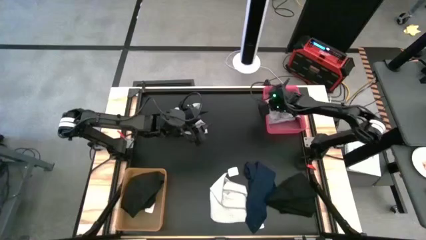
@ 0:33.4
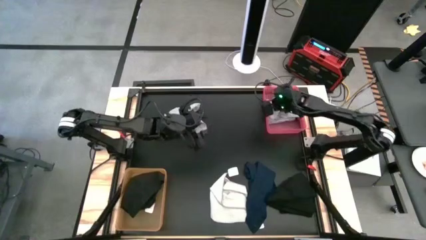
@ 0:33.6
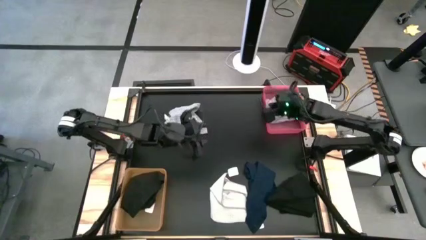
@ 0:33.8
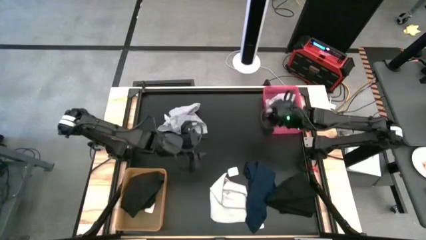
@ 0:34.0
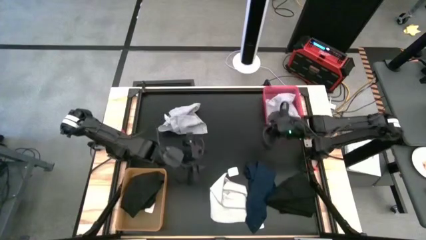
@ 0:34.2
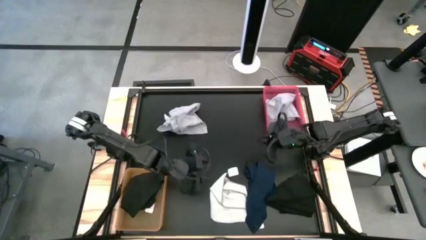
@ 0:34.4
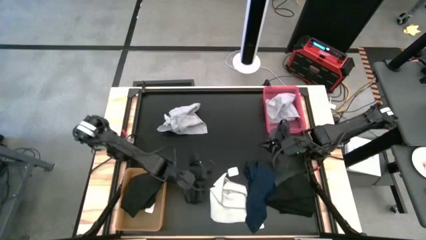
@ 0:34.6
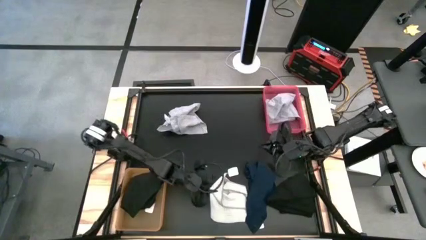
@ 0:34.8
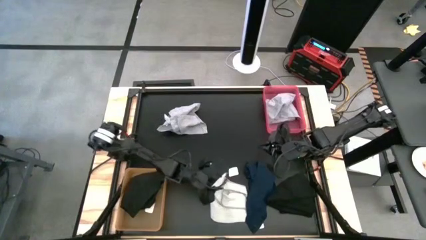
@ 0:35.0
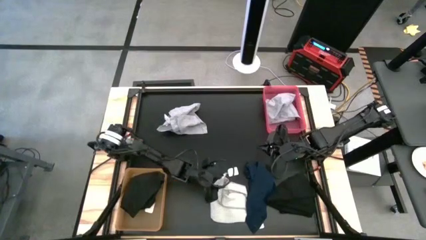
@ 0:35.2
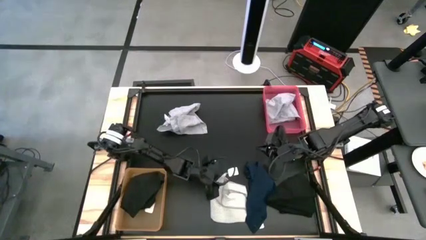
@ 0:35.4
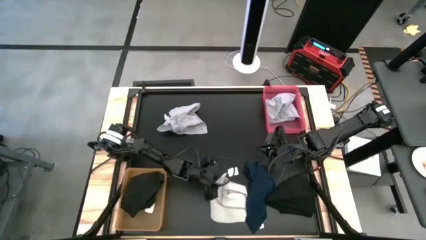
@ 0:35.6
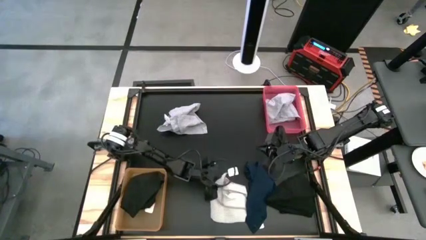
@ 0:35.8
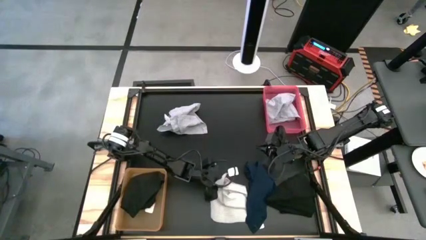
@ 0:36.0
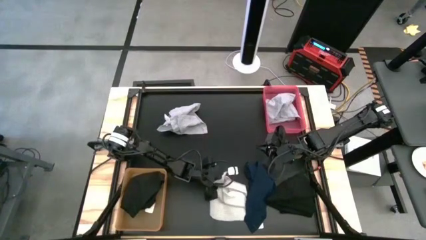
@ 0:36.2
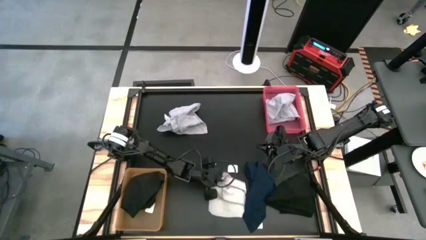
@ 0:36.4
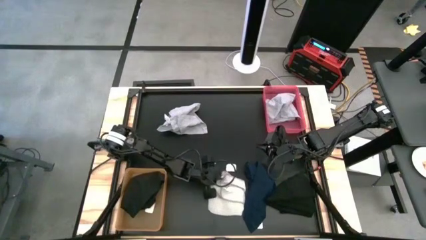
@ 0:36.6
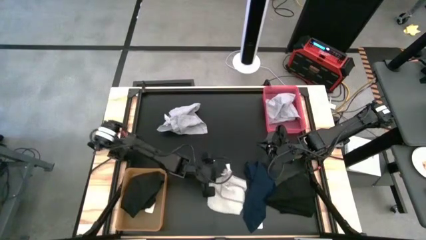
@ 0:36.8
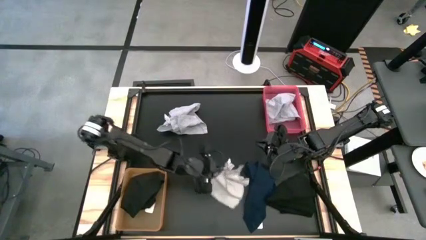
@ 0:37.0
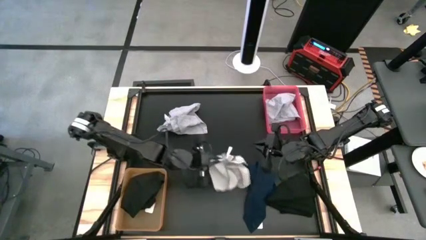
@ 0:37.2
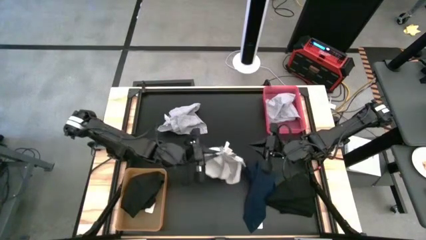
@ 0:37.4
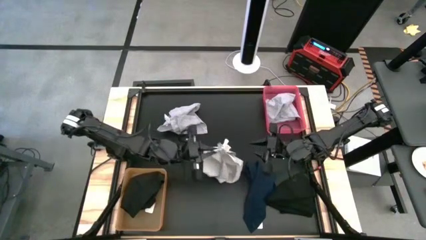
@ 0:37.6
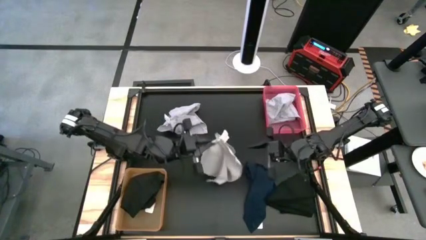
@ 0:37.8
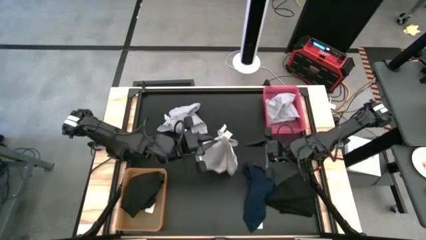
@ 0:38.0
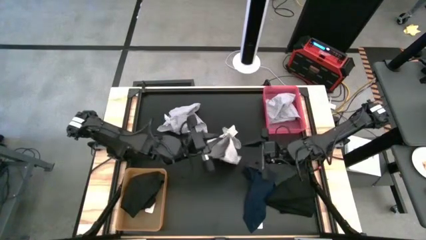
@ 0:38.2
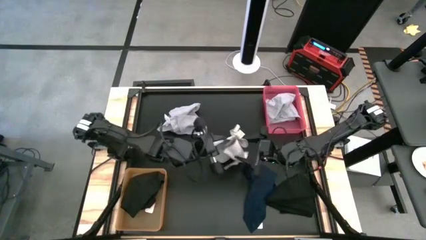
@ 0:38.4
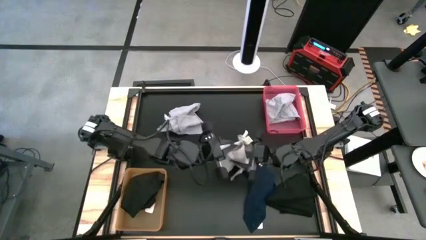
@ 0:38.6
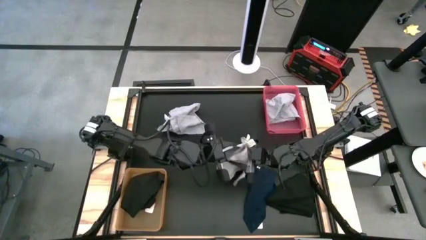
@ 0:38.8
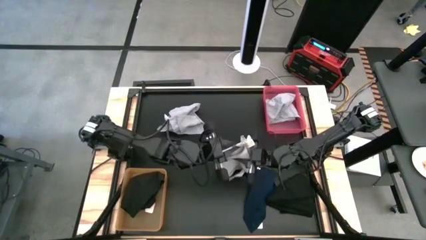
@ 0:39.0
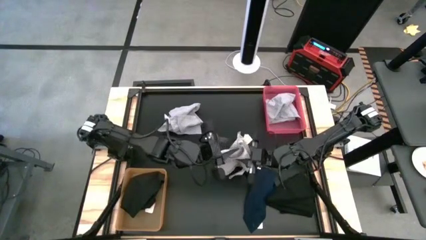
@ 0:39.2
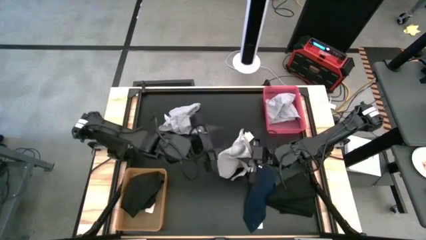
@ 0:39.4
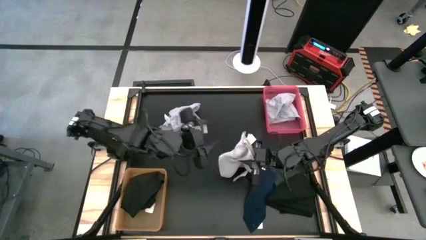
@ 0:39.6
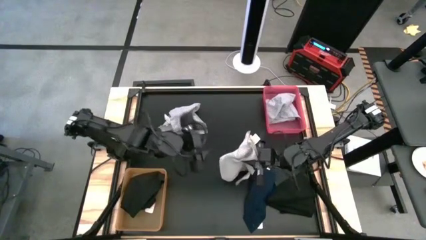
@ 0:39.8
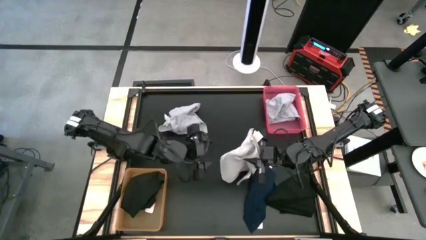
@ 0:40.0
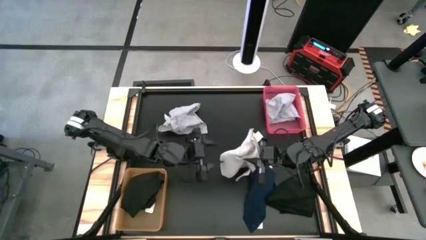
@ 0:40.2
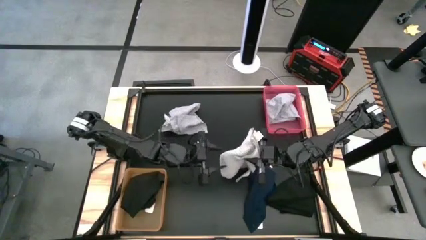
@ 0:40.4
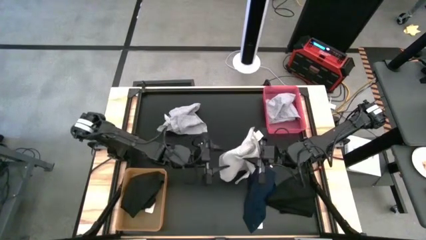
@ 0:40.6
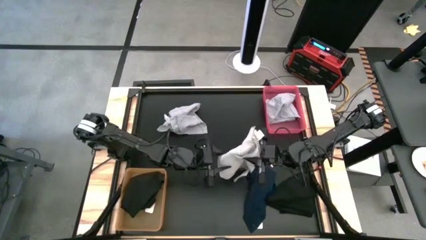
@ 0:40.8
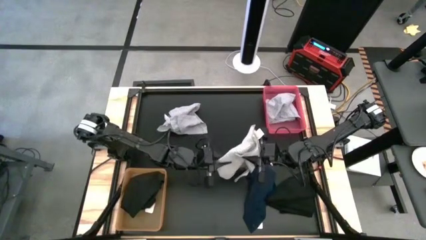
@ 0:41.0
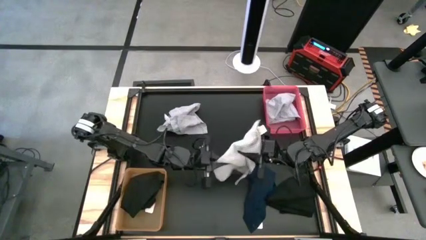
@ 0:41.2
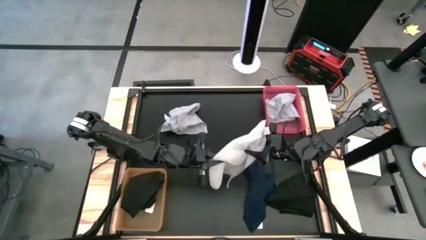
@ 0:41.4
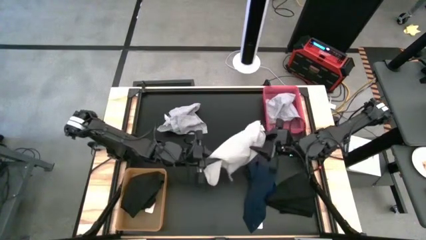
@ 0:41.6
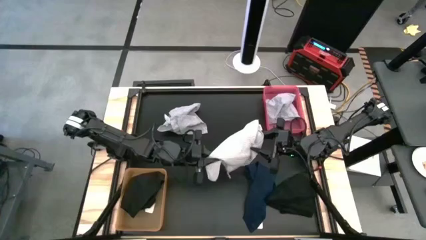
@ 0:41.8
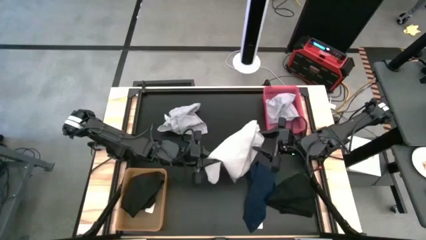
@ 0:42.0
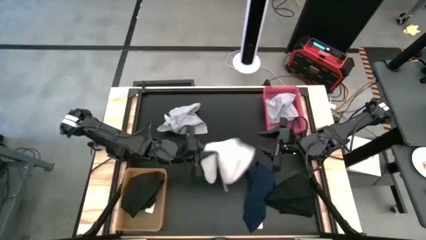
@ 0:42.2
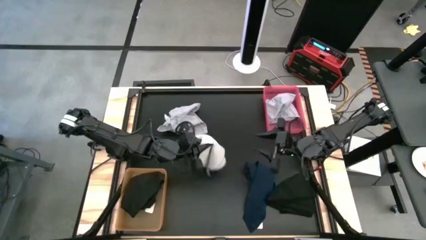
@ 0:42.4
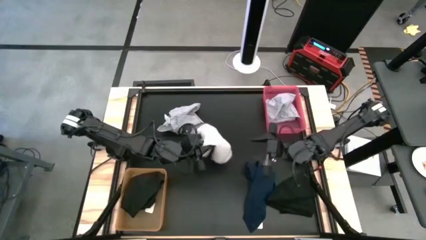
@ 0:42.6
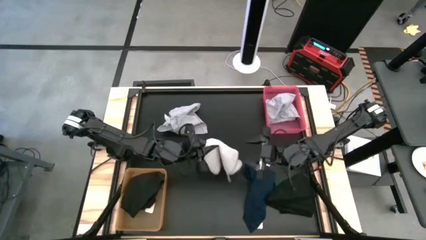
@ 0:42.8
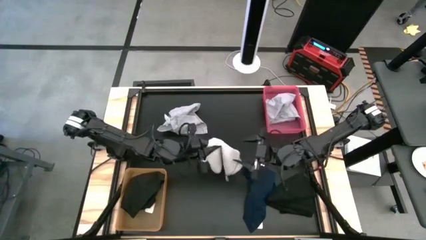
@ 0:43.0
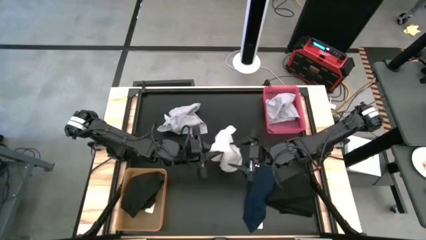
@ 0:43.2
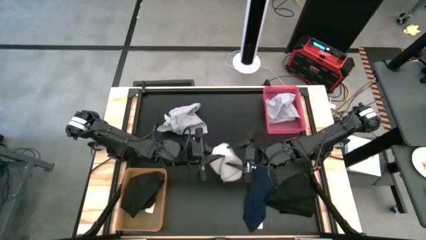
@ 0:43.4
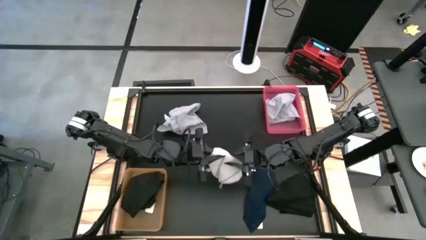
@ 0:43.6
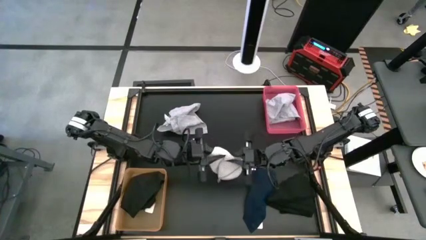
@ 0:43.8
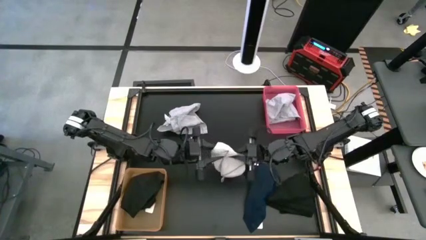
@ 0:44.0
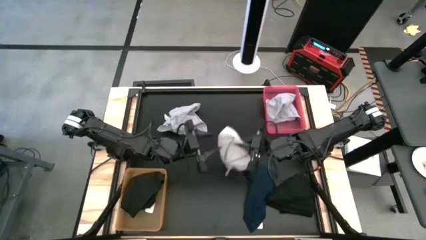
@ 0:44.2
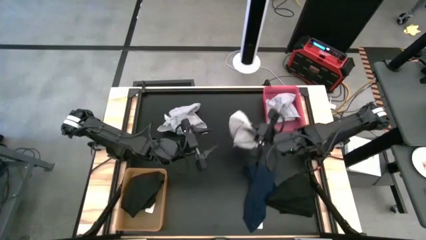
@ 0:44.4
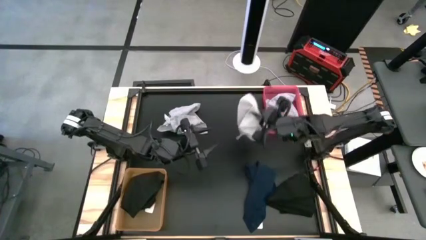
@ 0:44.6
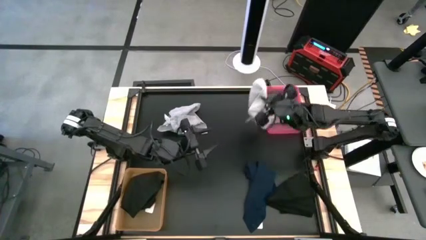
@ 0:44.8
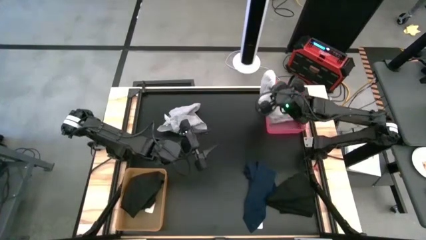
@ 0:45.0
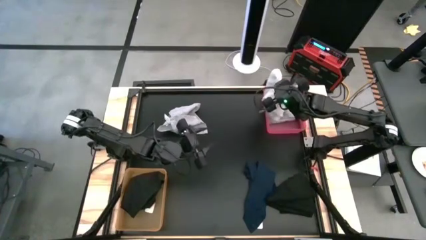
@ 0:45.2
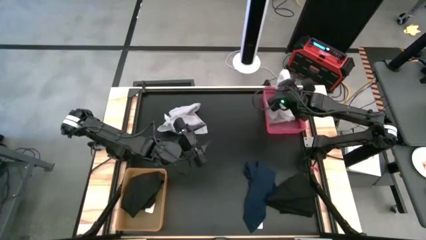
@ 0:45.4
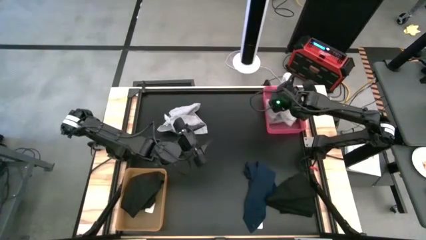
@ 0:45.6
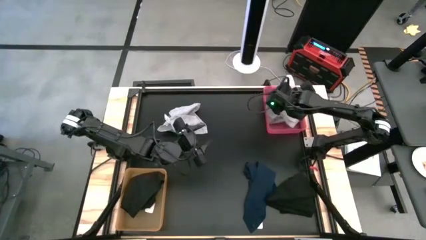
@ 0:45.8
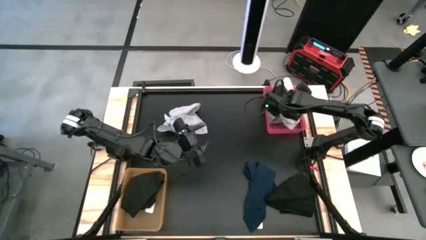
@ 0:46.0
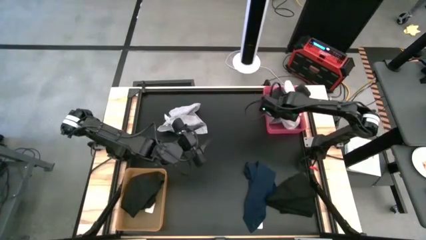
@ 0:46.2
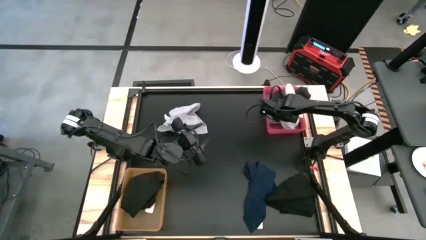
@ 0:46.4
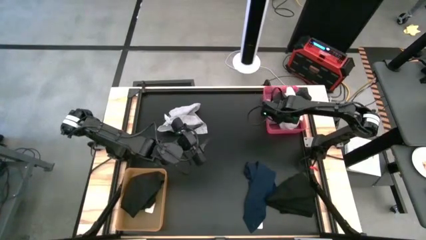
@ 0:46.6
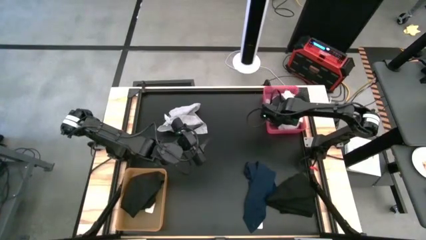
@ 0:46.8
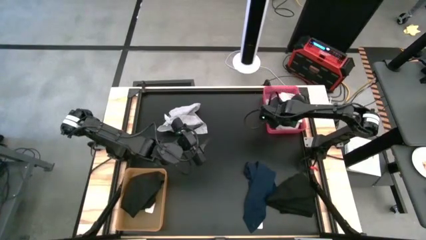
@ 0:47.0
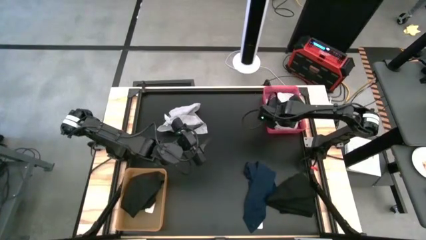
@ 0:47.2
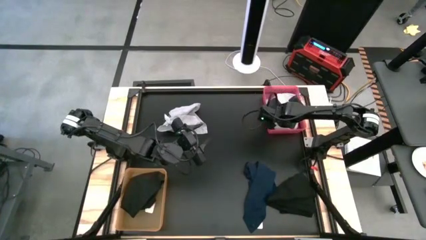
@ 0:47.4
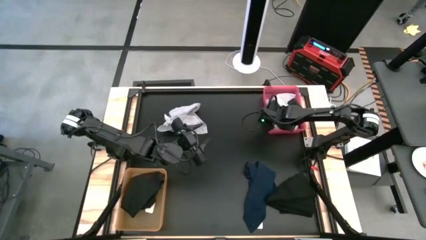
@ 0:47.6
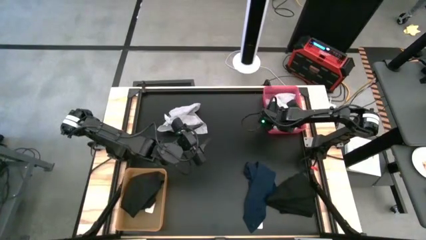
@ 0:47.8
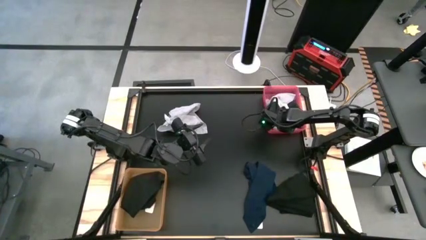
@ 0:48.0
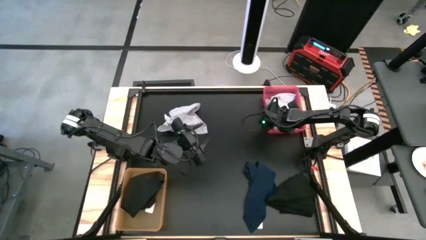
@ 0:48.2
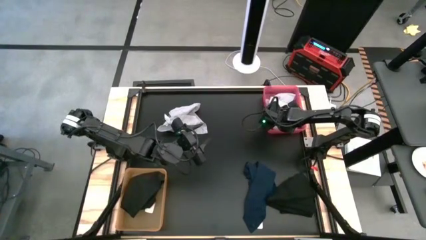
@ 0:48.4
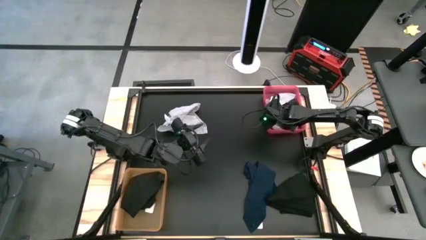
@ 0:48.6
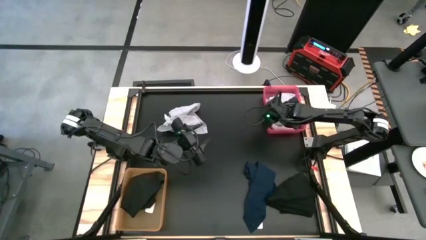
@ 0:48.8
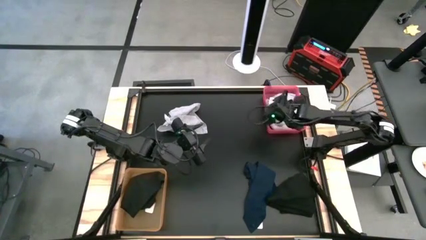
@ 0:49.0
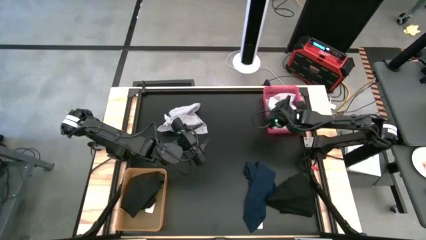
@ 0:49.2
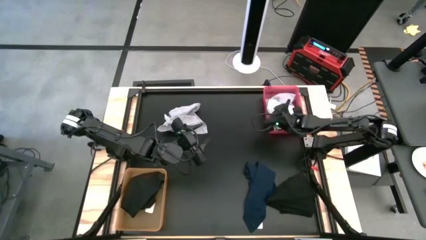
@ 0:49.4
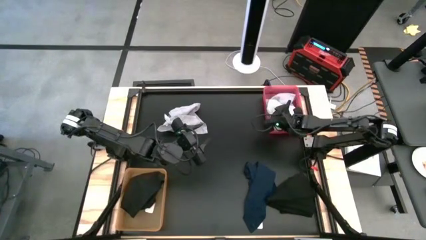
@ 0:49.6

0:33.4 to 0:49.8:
Task: Sort towels by color in basket
Put the white microfiber towel into the pink bin
